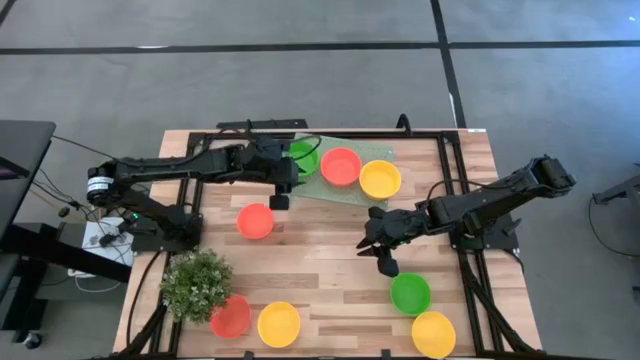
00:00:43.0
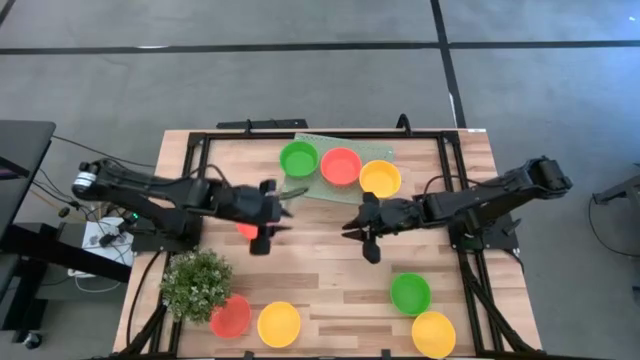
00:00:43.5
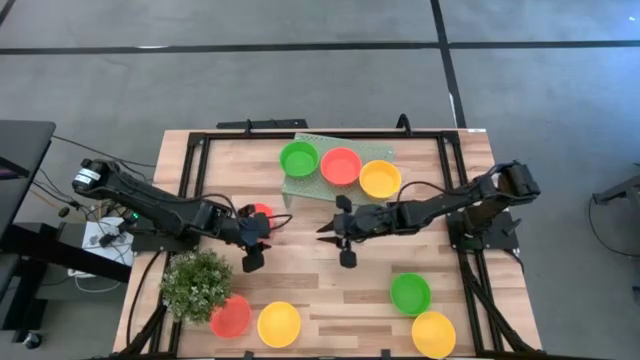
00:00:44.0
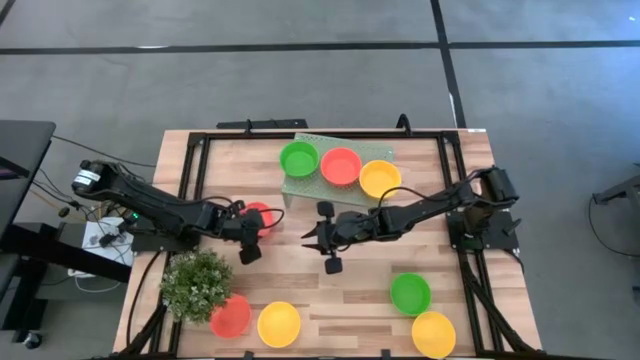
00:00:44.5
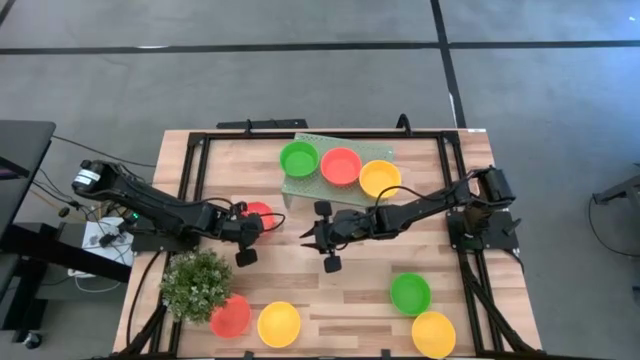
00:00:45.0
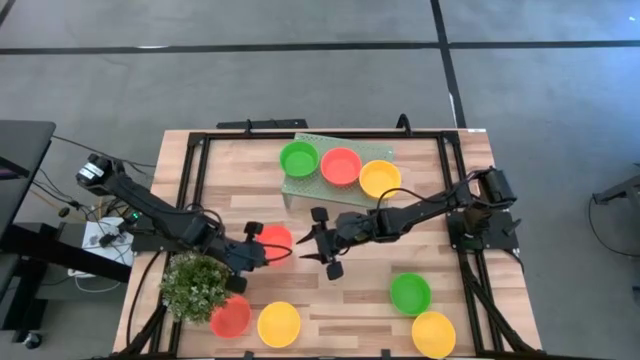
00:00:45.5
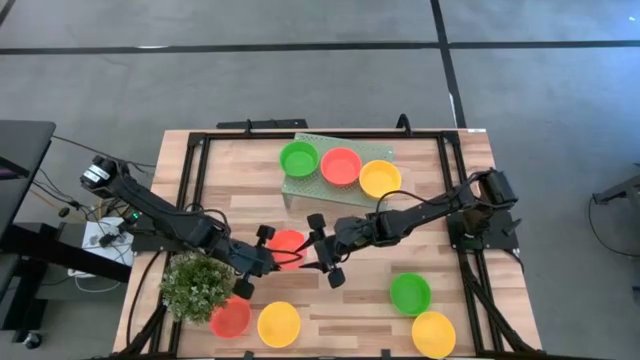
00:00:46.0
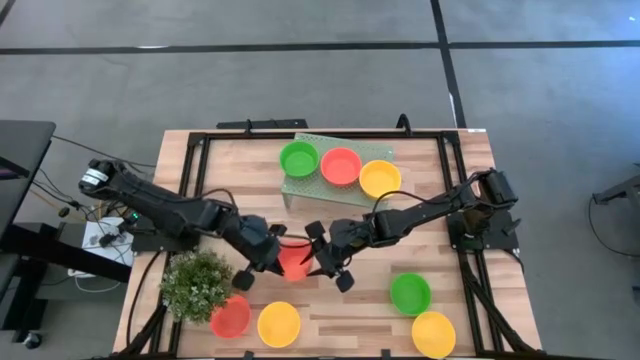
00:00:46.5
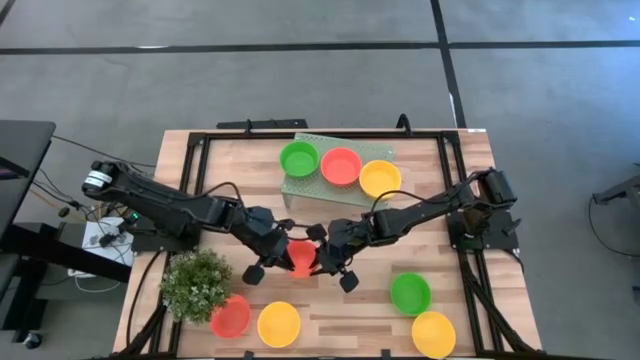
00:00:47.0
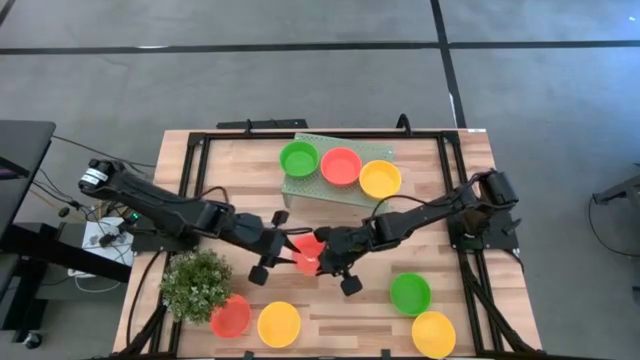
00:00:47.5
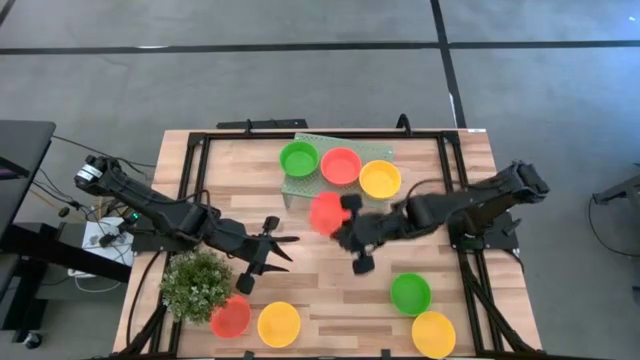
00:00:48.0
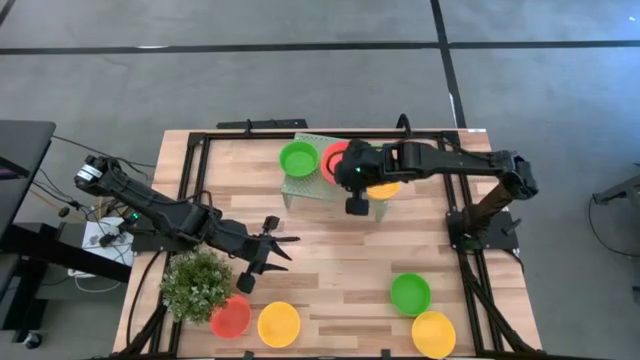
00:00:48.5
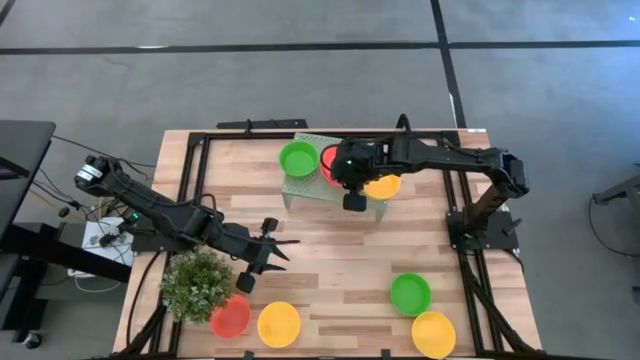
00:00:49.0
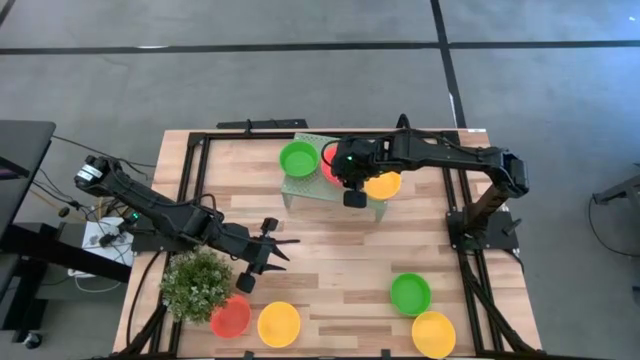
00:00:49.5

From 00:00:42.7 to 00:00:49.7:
Task: Pick & Place Mini bowls
Stack the orange bowl on top of the orange bowls on the shelf

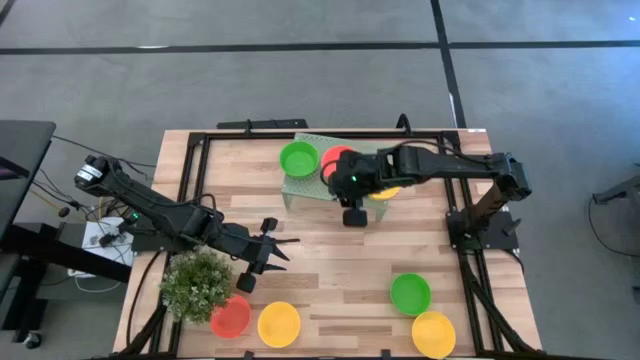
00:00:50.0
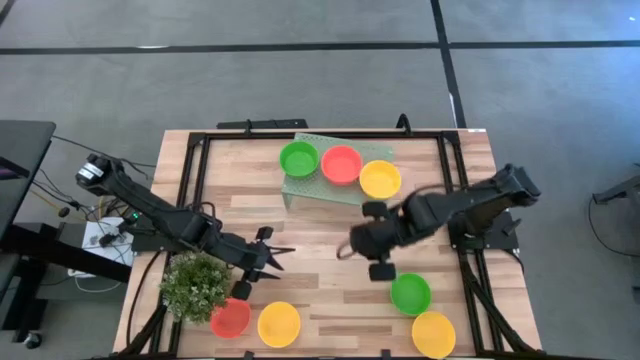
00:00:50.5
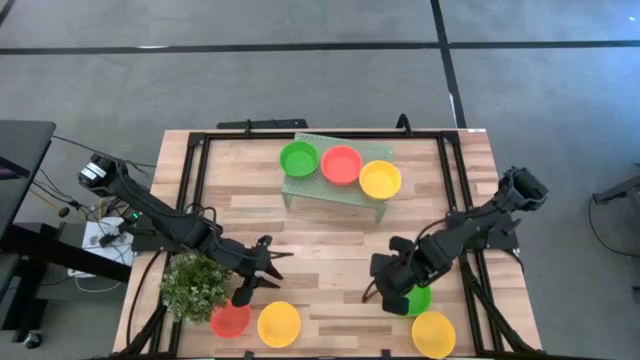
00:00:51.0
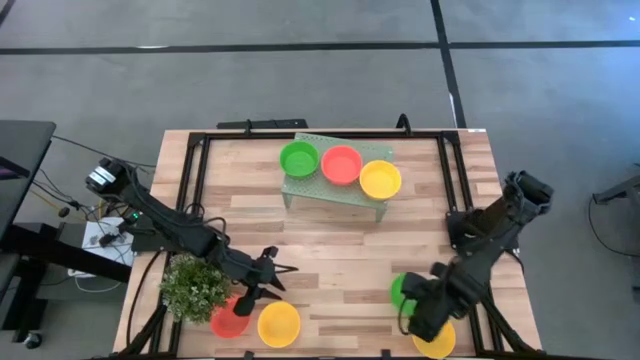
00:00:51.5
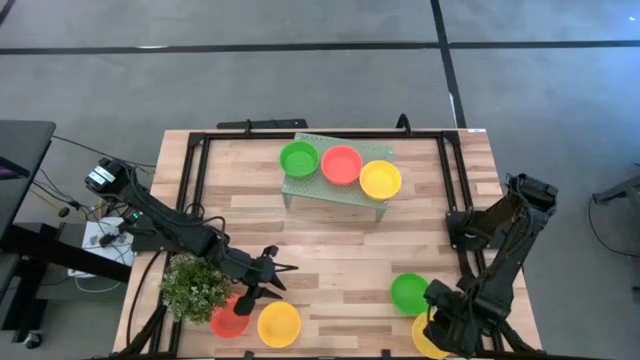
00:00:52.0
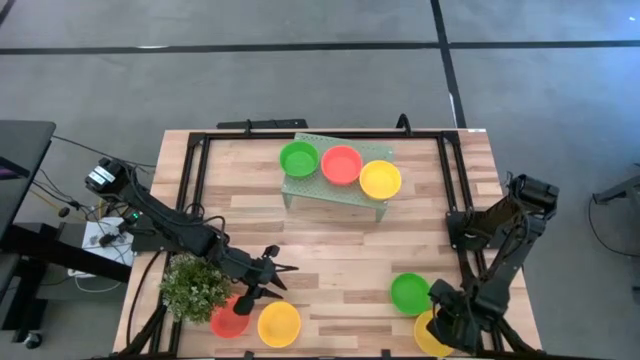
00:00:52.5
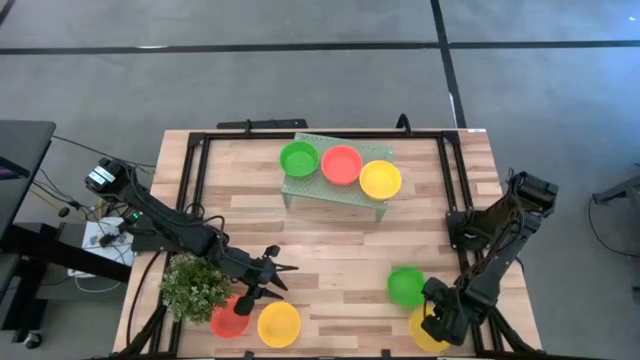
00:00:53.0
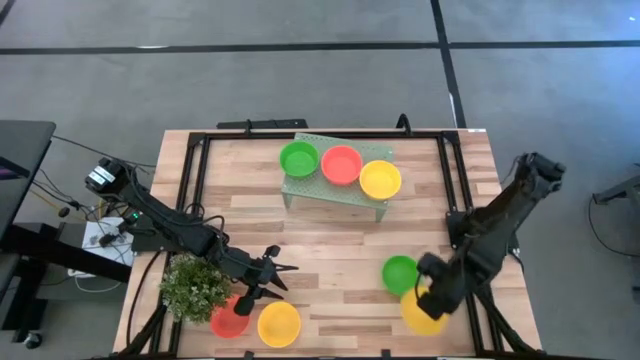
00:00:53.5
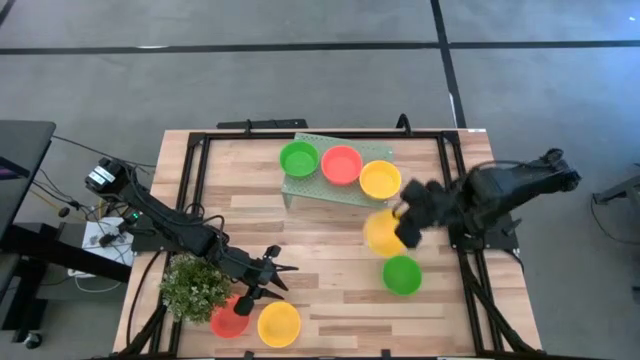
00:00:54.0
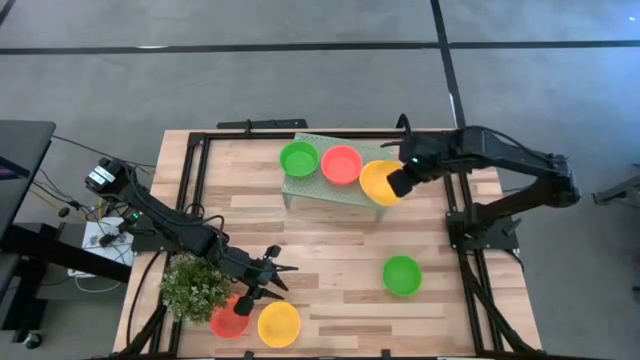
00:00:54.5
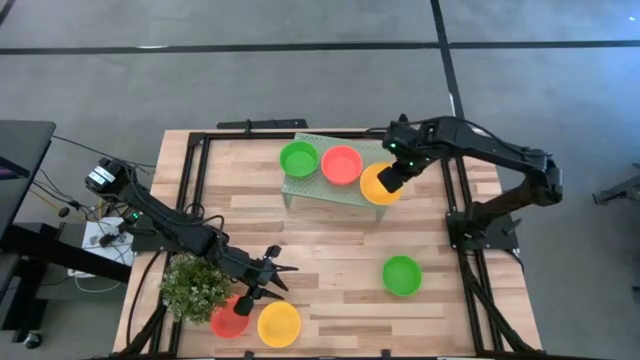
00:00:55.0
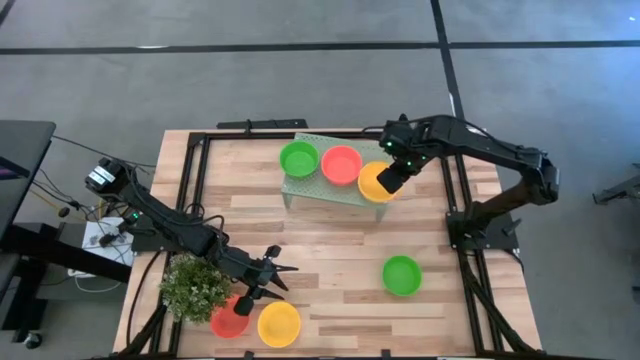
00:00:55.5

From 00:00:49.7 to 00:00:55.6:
Stack the yellow bowl on top of the yellow bowls on the shelf

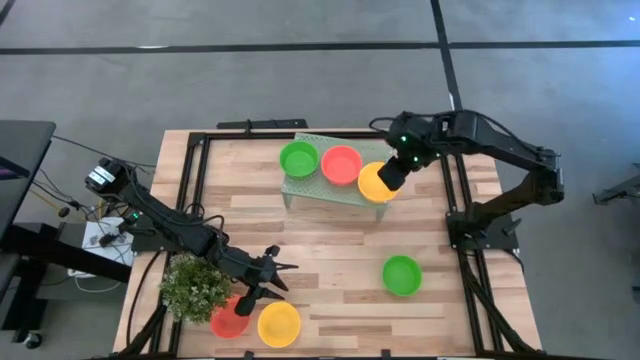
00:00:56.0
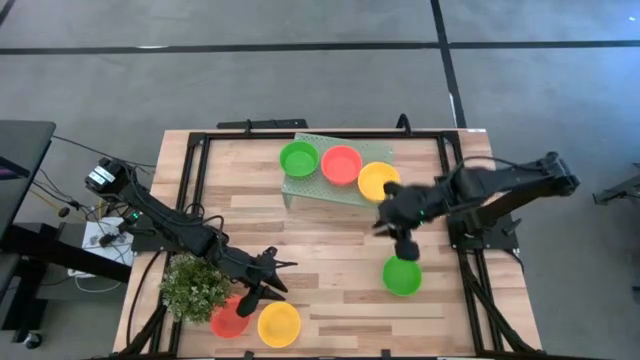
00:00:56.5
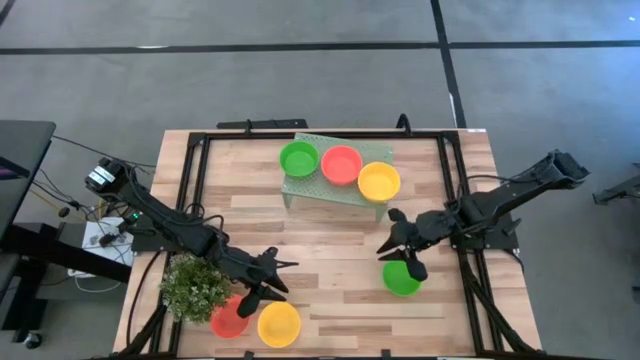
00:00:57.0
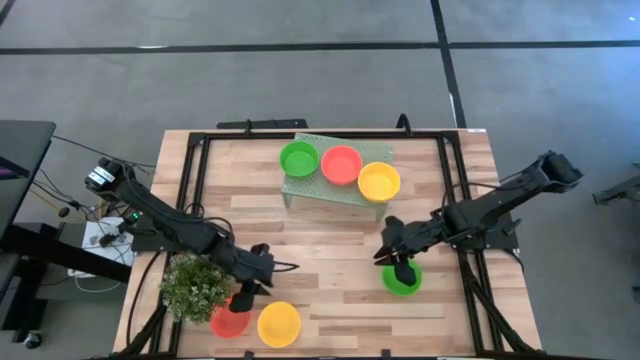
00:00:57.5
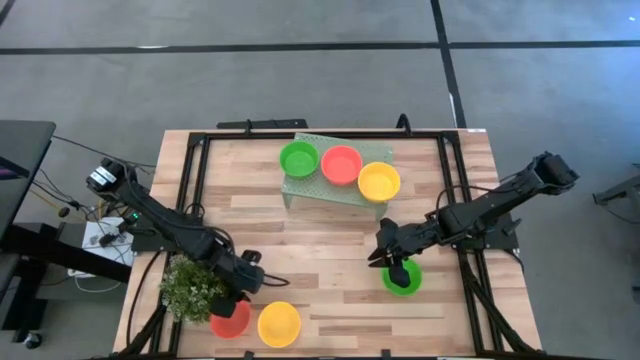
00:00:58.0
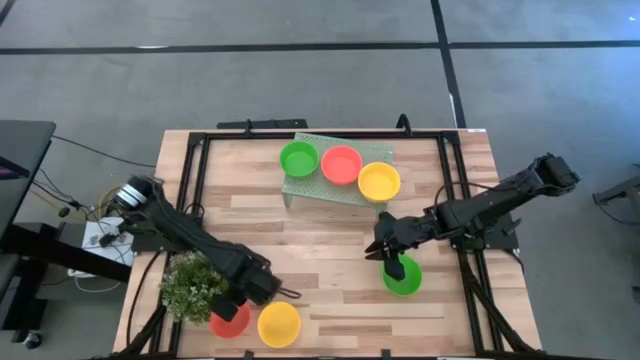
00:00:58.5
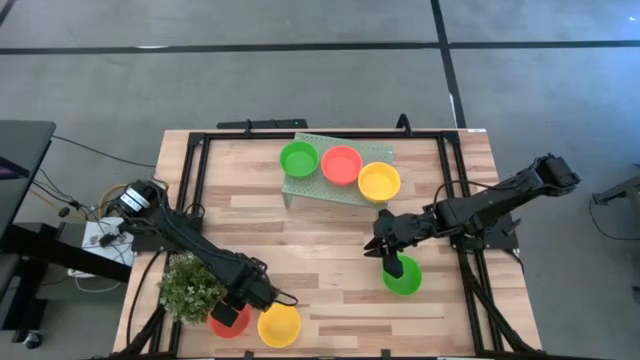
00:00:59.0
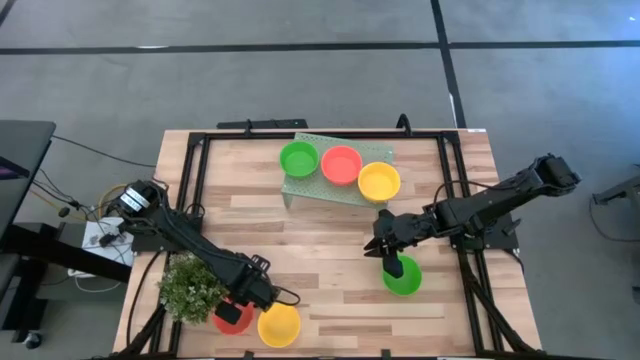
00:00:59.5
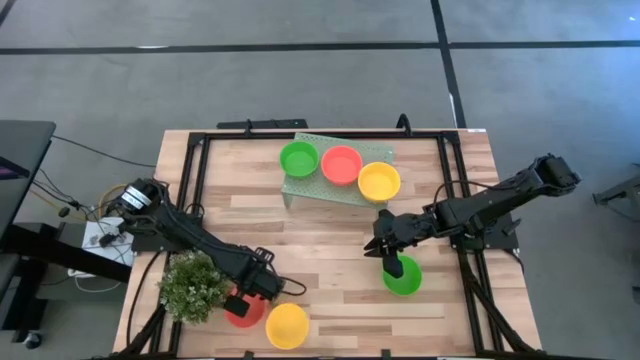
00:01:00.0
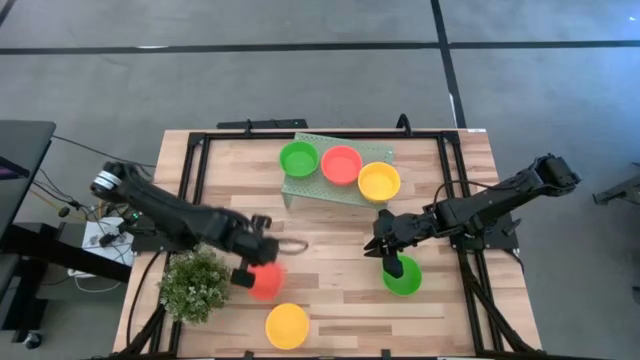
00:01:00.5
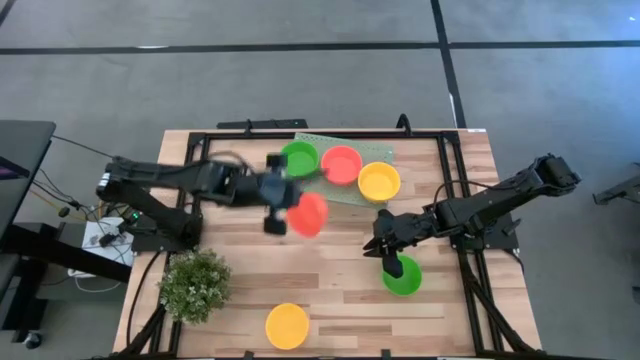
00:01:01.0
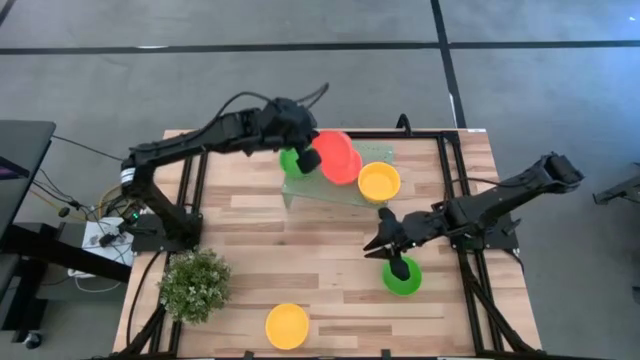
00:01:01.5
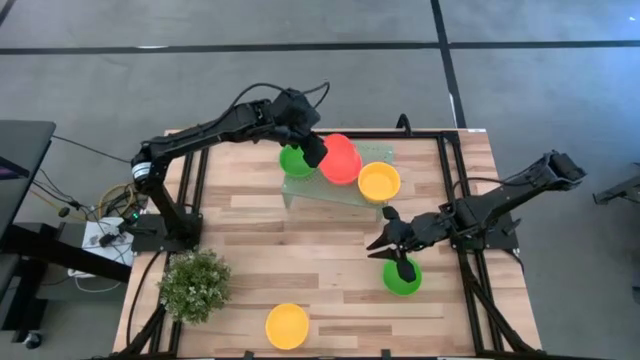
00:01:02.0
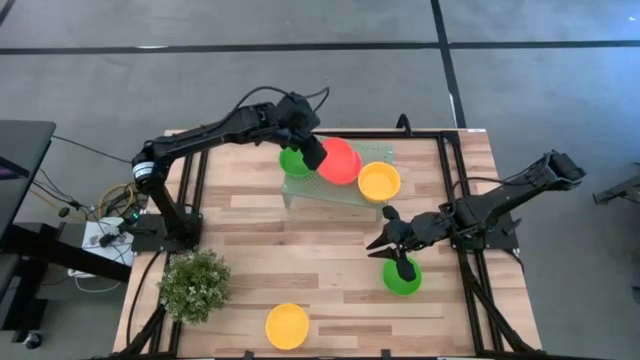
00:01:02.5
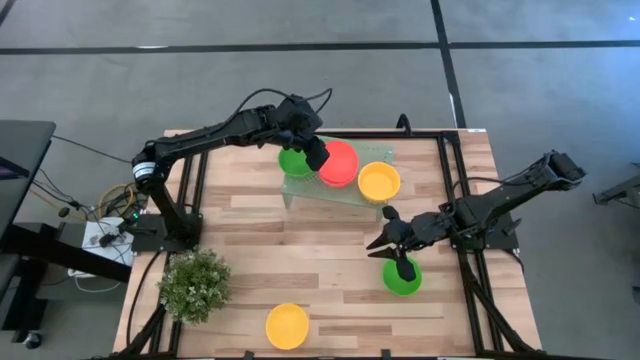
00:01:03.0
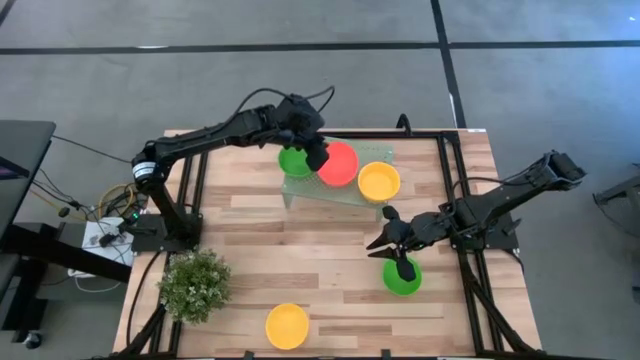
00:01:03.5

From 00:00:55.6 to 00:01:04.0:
Stack the orange bowl on top of the orange bowls on the shelf
